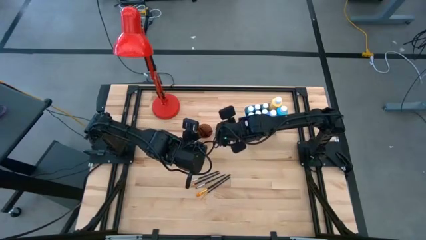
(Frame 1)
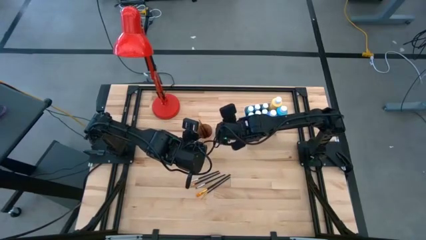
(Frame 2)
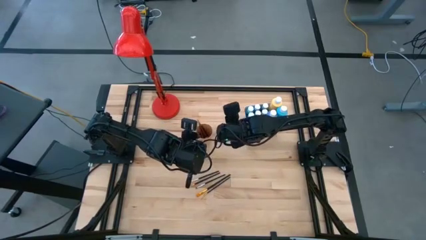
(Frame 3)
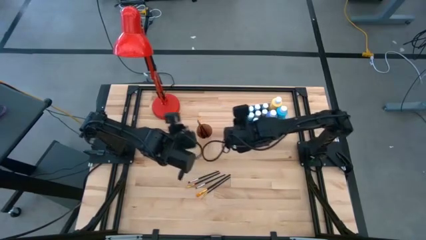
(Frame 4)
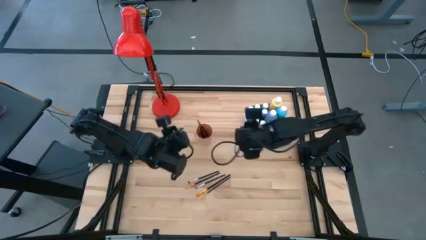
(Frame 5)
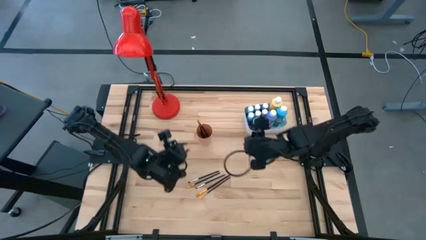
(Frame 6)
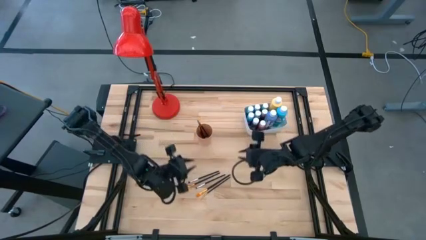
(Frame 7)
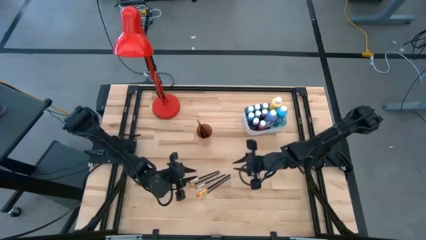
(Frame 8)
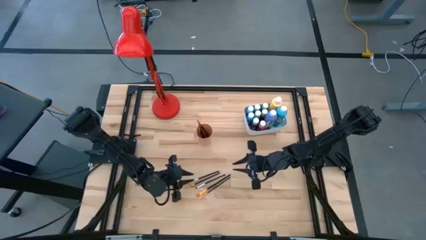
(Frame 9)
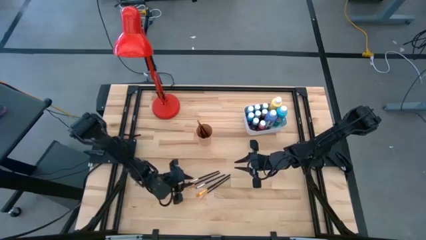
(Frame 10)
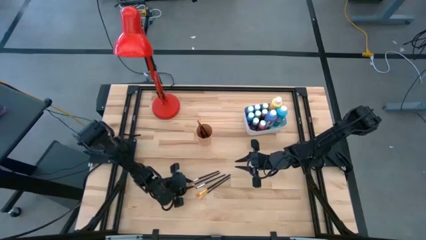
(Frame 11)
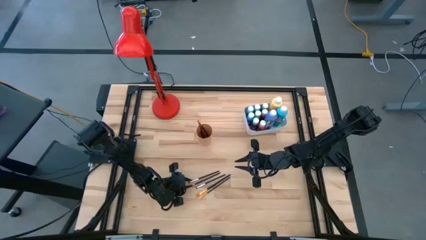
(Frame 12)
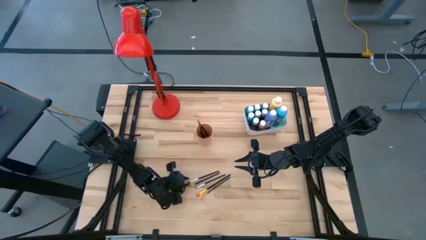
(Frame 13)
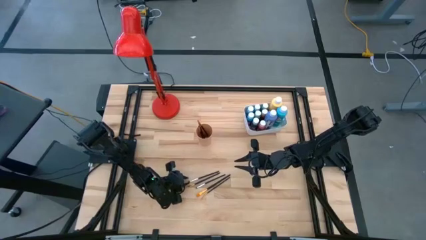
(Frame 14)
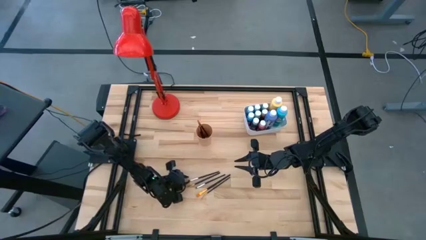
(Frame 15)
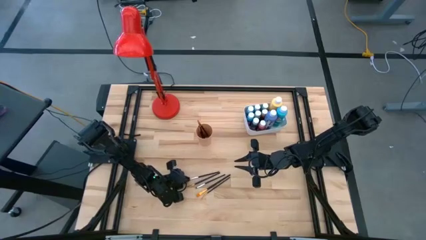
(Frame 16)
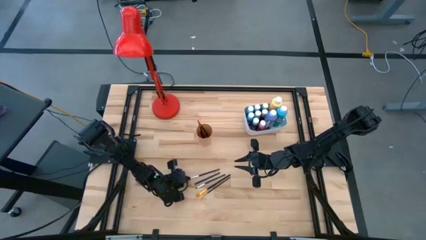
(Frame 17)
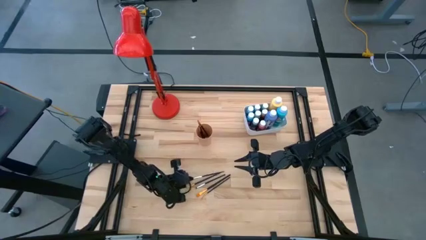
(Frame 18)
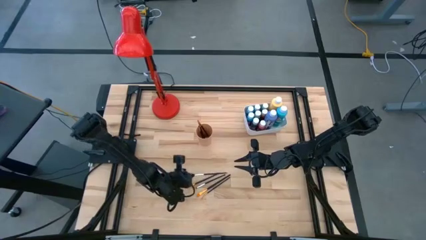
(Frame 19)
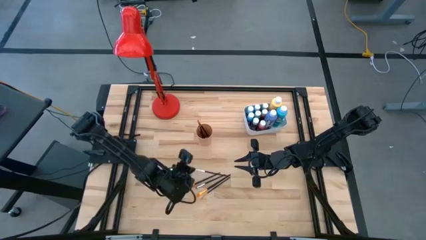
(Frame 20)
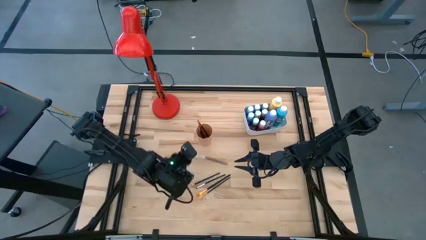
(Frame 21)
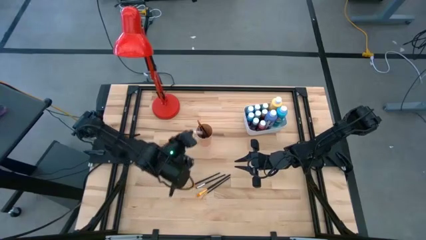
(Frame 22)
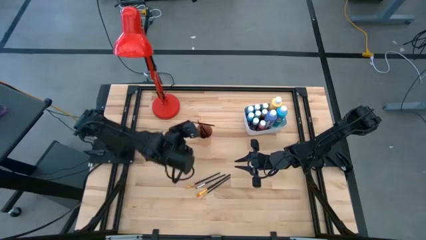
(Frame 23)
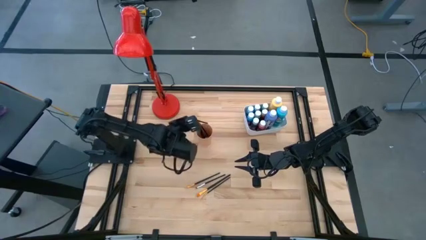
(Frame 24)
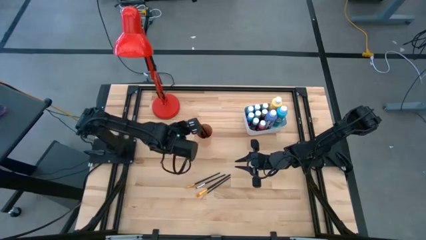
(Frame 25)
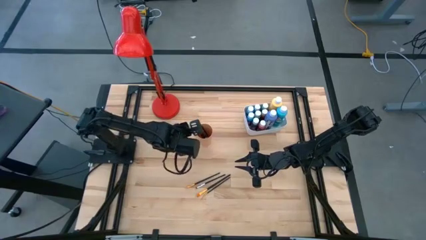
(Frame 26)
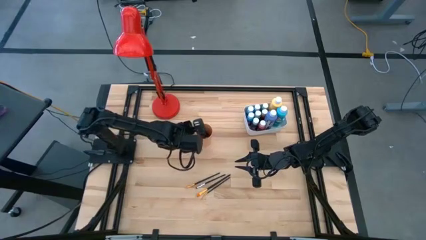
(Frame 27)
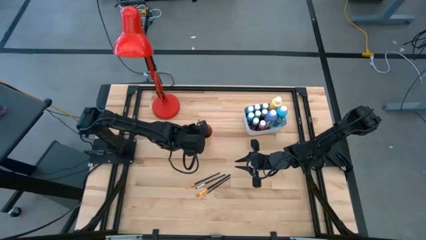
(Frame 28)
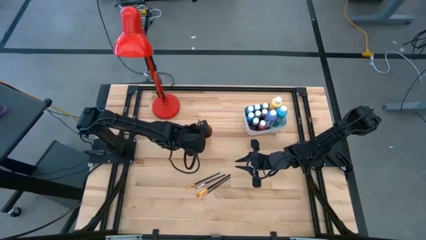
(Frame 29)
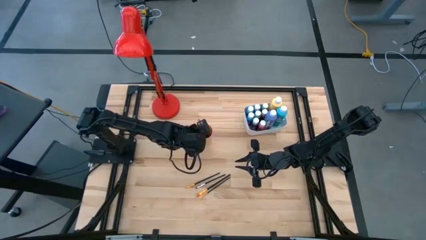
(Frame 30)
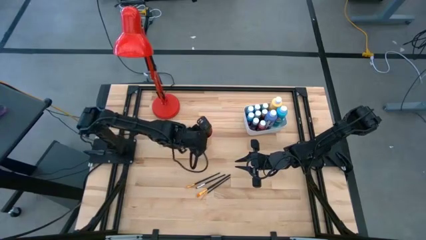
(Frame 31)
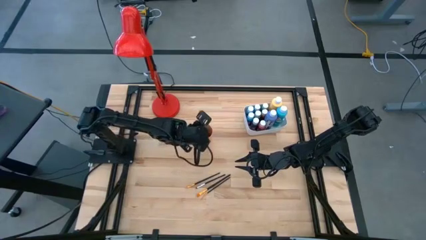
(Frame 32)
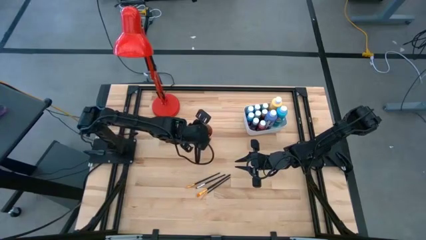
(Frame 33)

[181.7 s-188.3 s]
Task: Pick & Place Paint Supplies
Put the white paintbrush into the orange cup

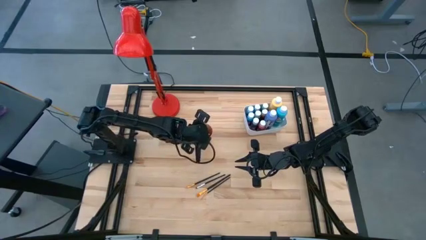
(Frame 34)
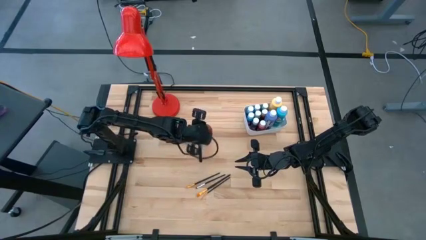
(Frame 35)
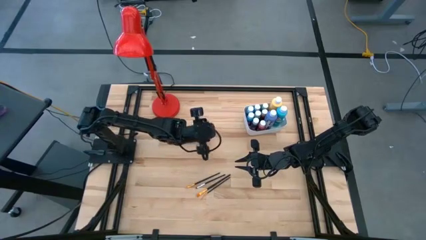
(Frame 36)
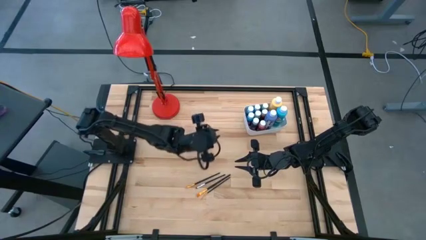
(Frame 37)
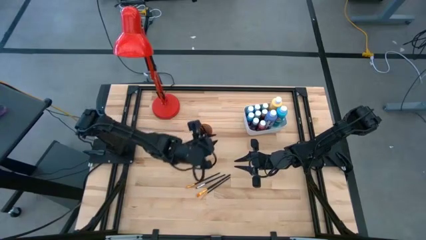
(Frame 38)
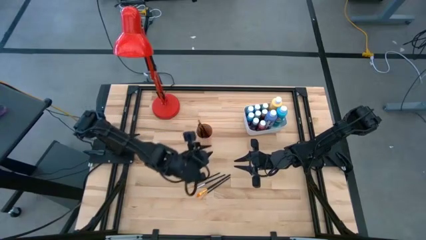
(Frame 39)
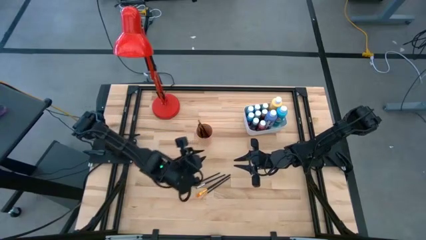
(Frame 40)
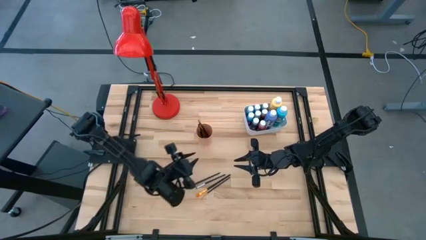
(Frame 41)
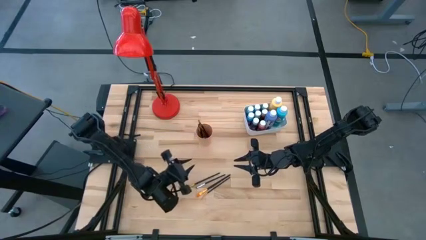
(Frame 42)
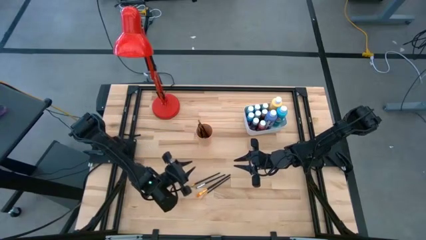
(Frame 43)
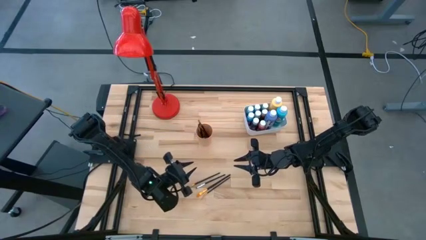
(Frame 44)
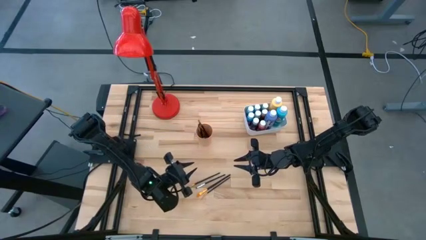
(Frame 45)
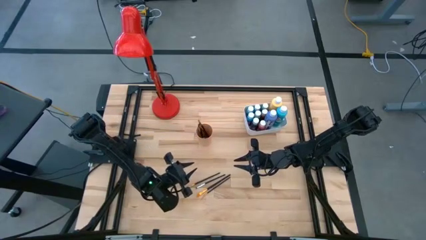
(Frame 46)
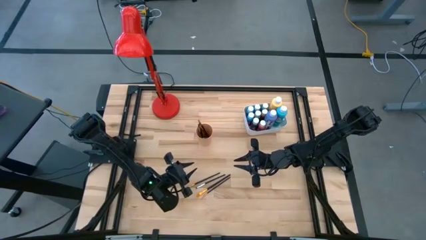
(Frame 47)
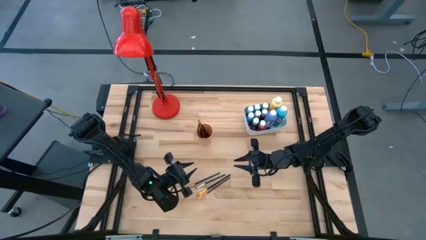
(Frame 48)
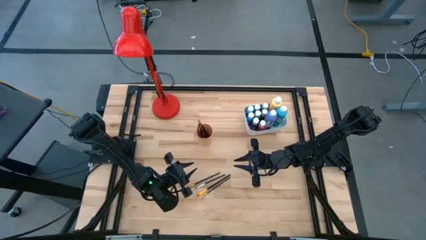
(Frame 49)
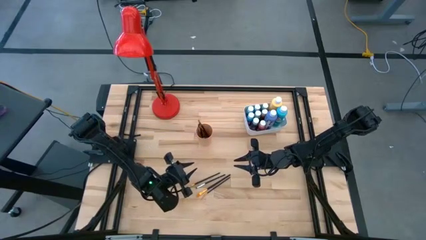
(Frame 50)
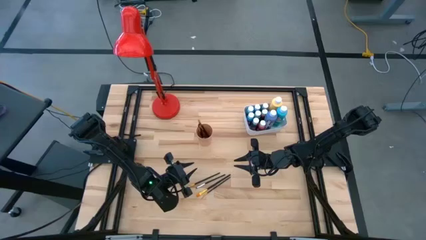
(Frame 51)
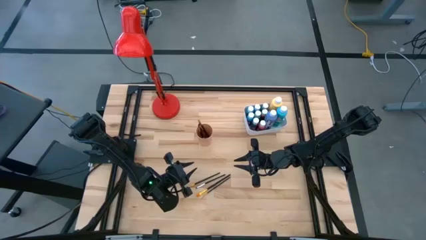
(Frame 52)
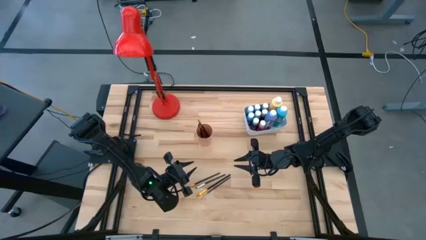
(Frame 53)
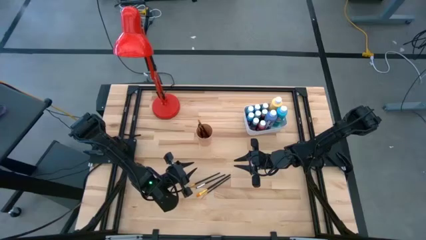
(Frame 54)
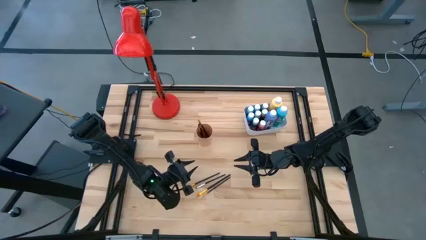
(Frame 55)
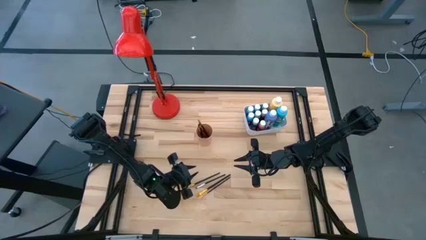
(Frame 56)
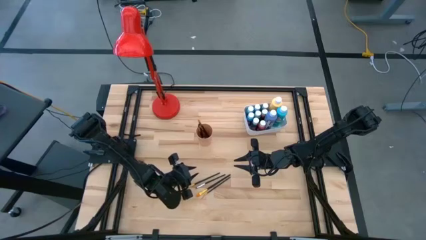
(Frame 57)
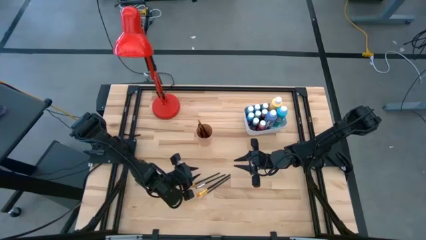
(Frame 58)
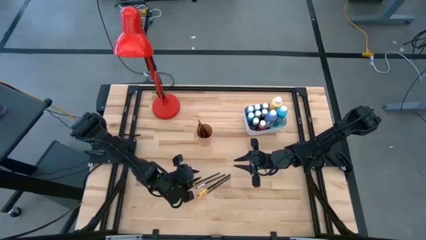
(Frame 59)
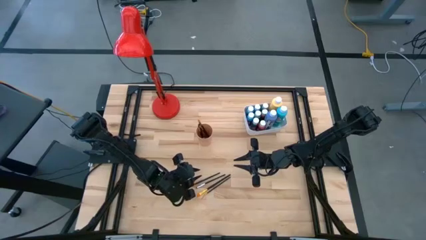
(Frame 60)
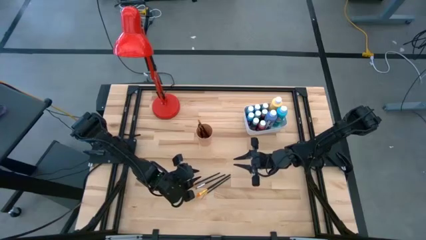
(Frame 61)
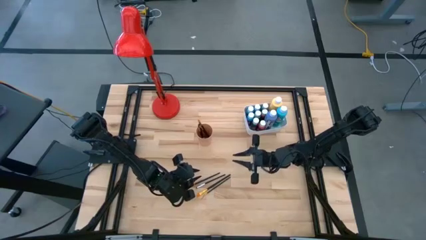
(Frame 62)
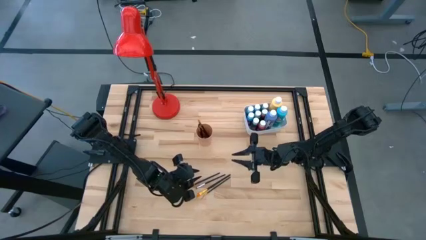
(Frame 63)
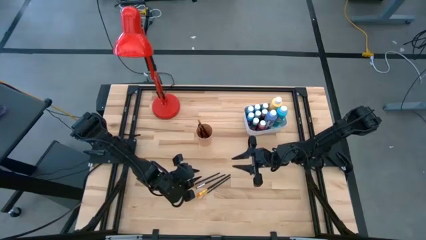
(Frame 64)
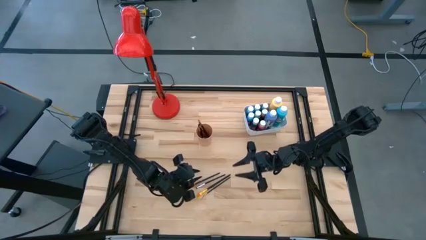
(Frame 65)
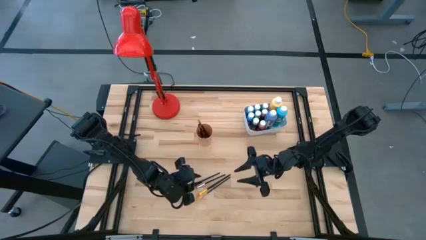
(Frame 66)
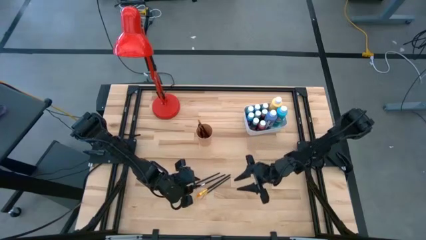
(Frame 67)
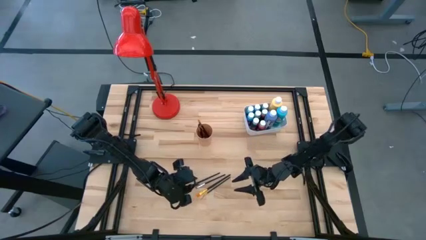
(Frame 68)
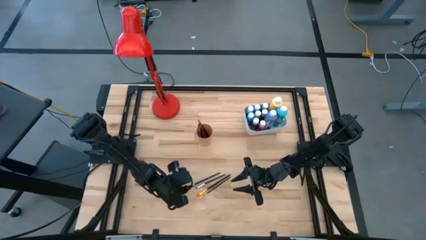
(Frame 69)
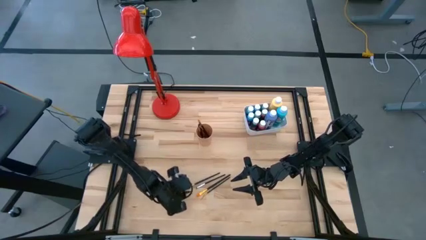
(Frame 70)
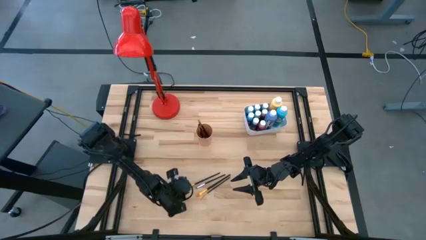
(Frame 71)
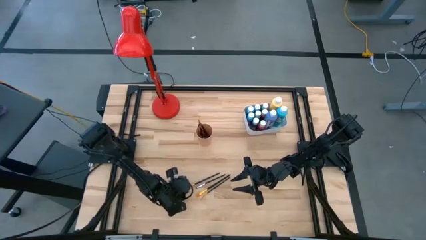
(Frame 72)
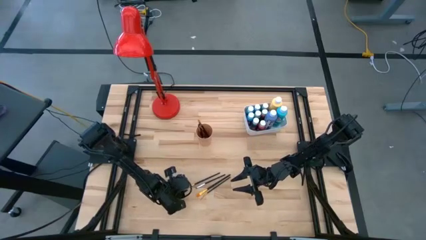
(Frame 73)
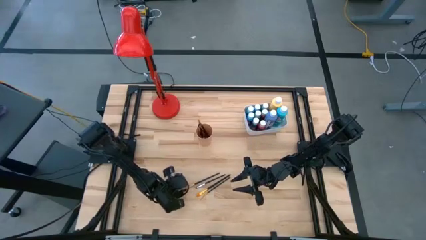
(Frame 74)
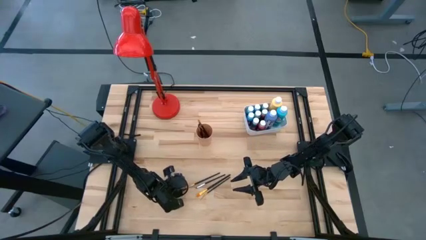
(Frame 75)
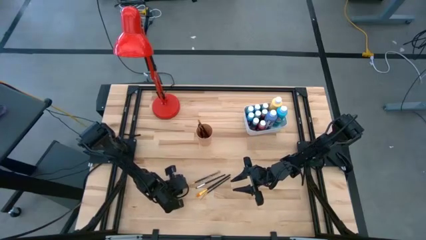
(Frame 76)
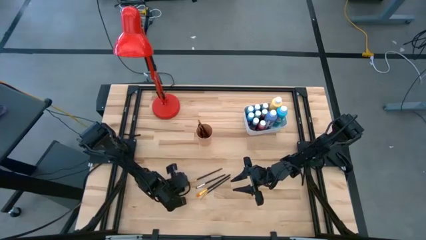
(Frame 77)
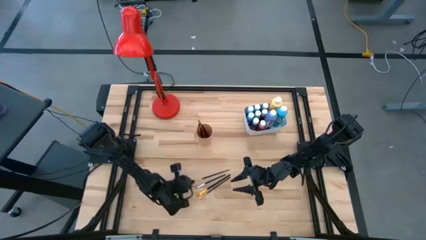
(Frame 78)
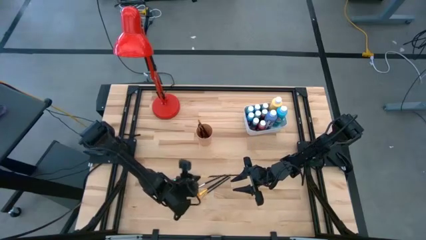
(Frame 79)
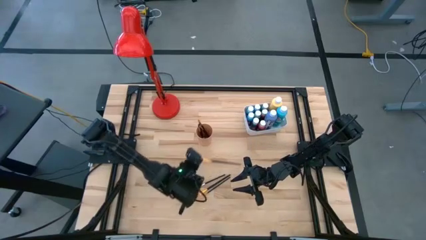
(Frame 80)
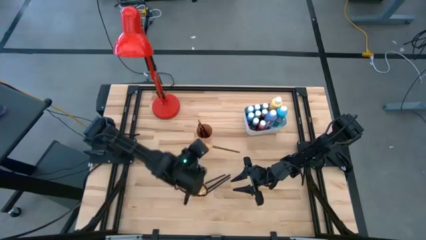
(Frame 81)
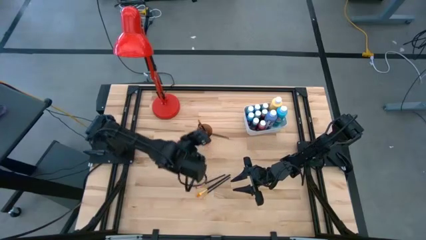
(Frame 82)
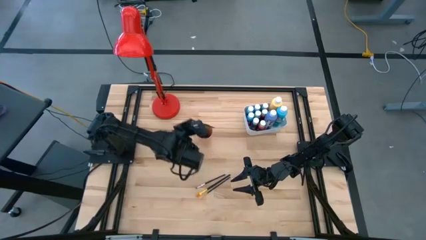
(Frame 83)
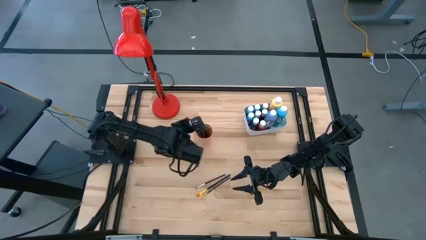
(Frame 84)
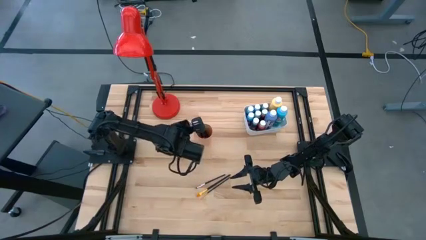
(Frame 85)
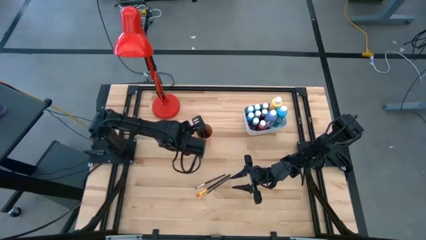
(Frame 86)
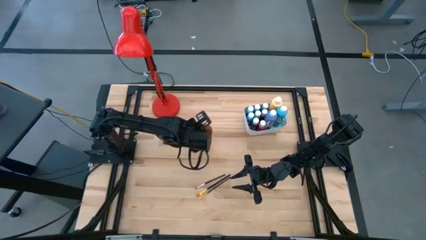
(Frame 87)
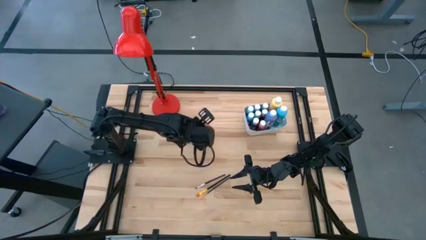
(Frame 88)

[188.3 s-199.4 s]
Put the orange paintbrush into the orange cup
